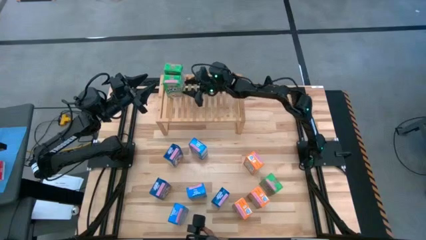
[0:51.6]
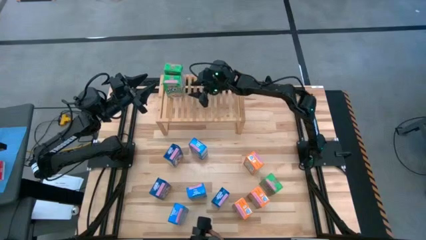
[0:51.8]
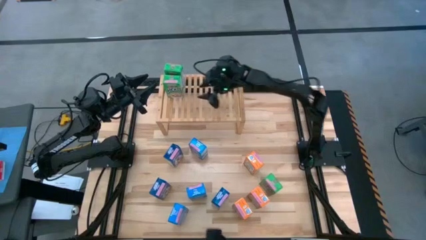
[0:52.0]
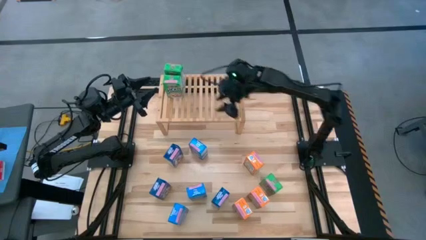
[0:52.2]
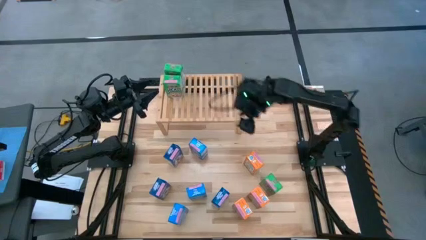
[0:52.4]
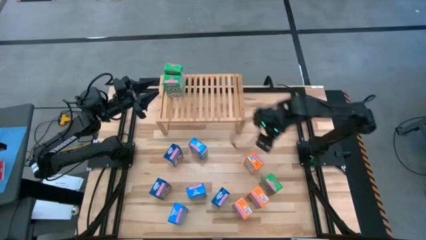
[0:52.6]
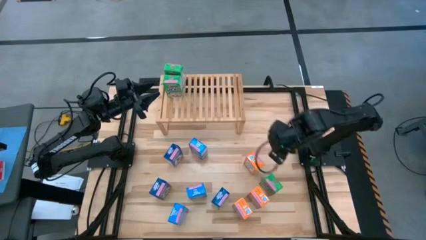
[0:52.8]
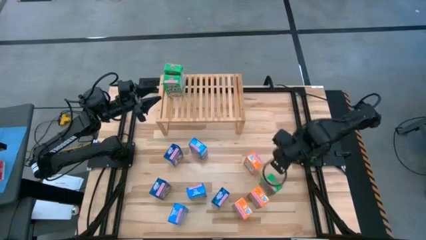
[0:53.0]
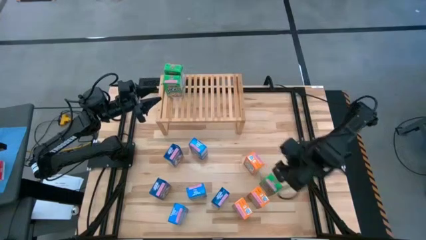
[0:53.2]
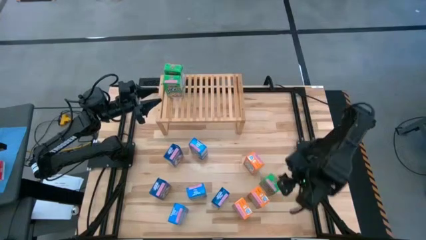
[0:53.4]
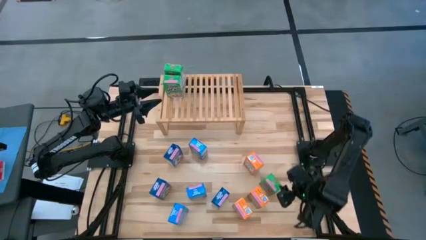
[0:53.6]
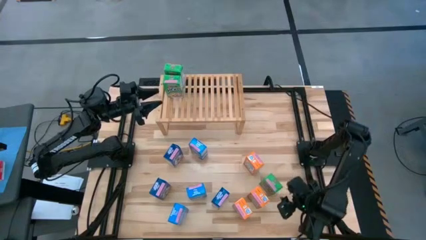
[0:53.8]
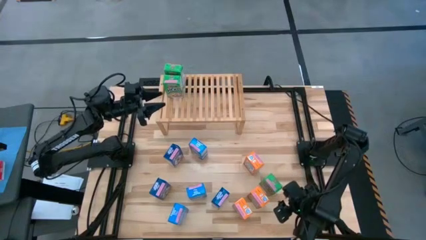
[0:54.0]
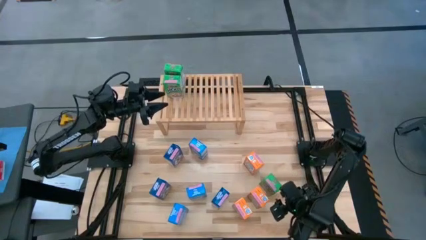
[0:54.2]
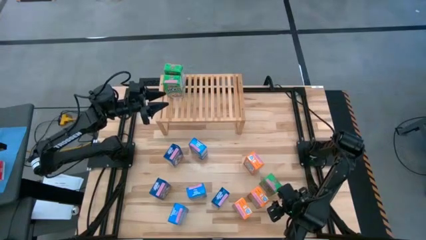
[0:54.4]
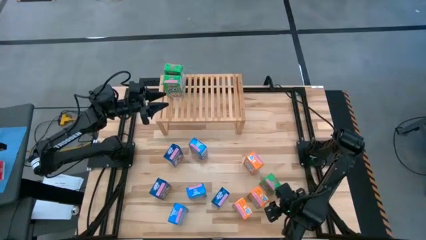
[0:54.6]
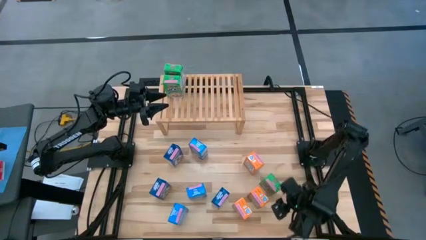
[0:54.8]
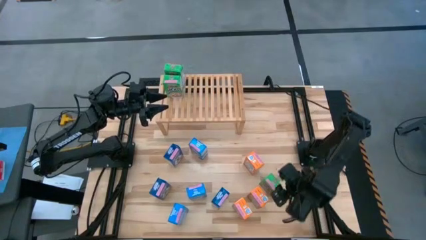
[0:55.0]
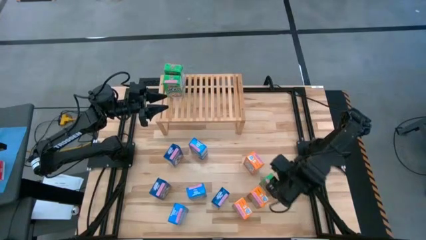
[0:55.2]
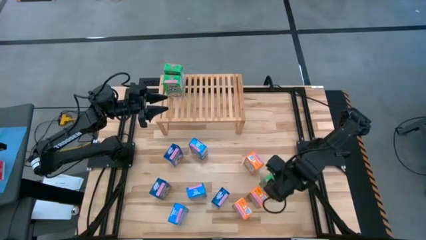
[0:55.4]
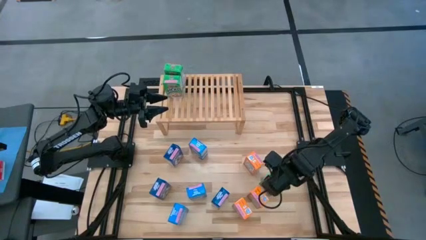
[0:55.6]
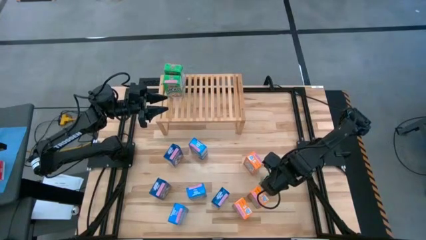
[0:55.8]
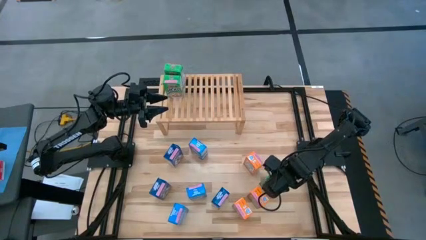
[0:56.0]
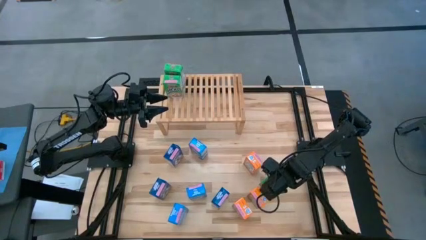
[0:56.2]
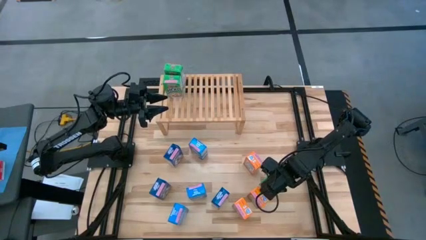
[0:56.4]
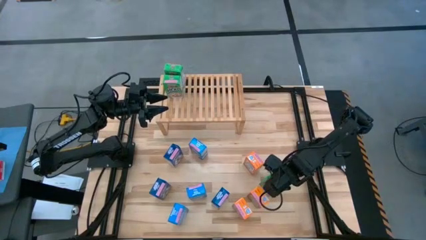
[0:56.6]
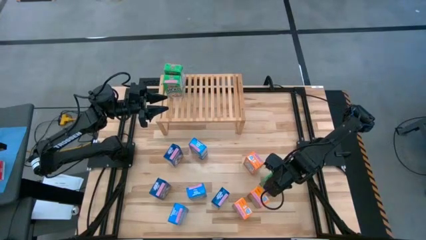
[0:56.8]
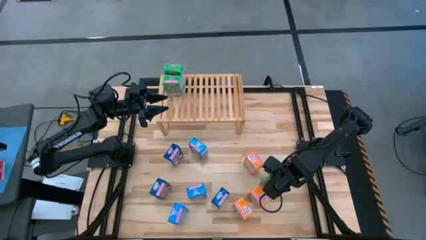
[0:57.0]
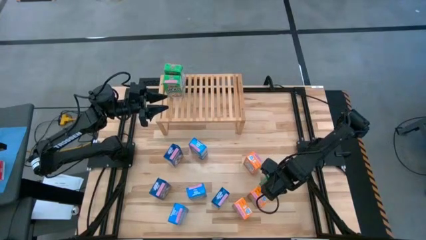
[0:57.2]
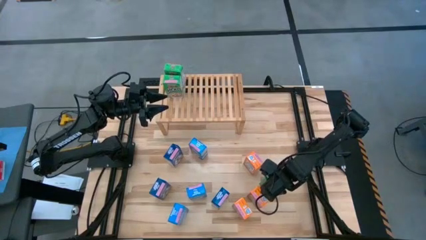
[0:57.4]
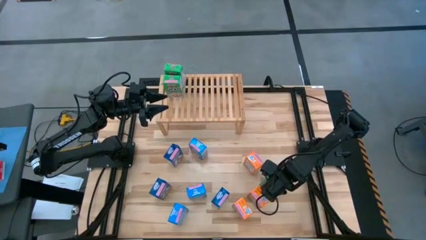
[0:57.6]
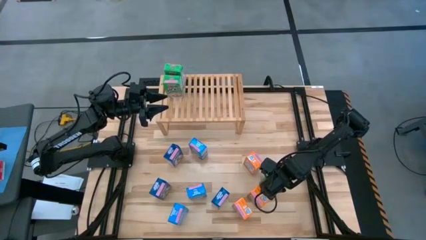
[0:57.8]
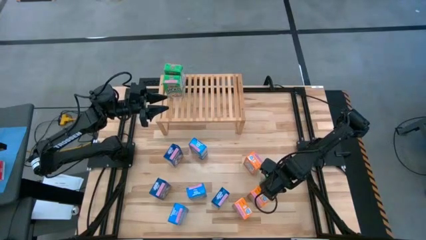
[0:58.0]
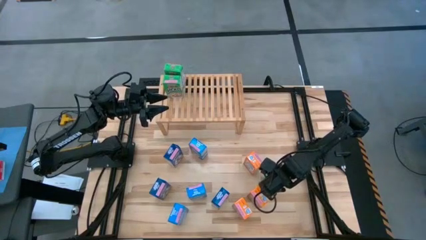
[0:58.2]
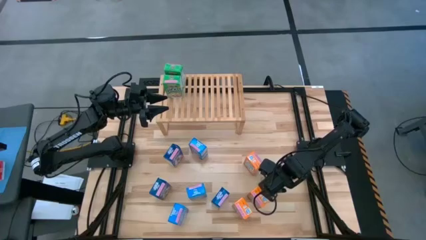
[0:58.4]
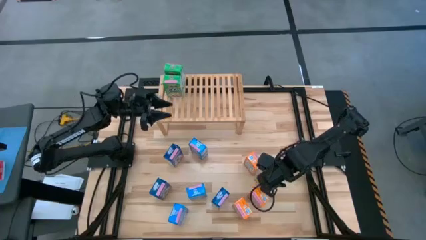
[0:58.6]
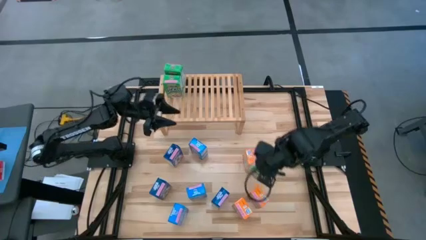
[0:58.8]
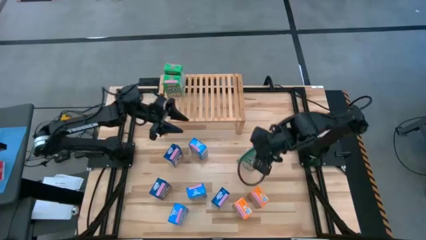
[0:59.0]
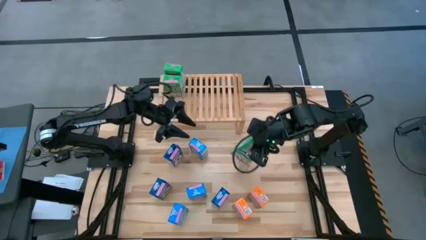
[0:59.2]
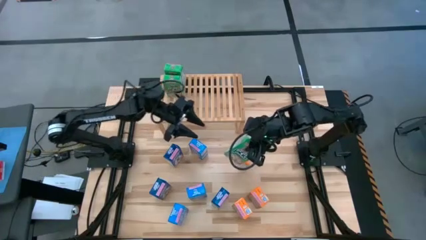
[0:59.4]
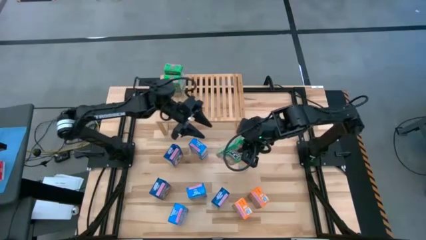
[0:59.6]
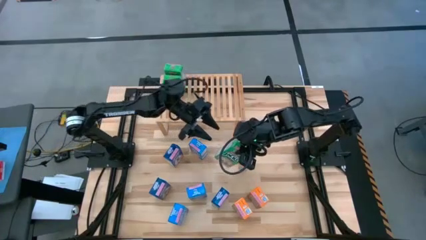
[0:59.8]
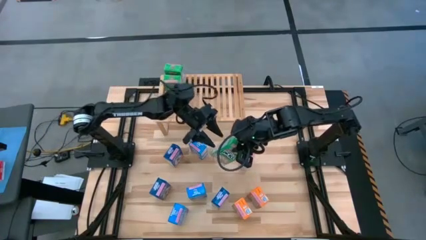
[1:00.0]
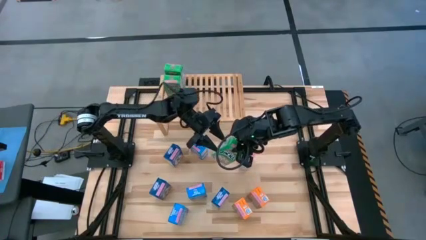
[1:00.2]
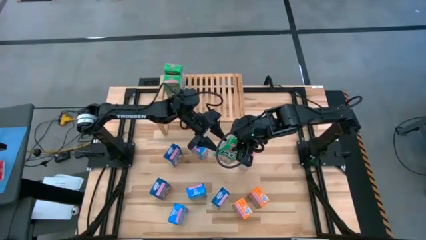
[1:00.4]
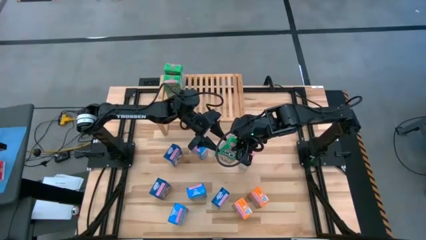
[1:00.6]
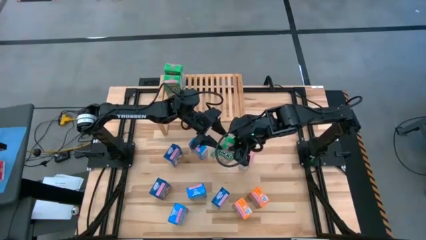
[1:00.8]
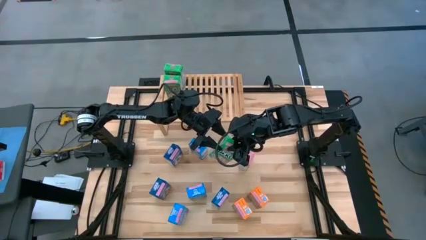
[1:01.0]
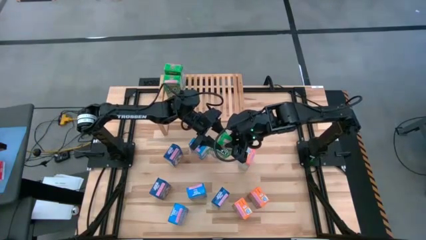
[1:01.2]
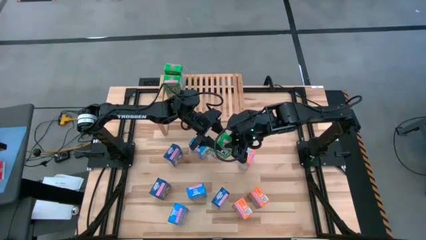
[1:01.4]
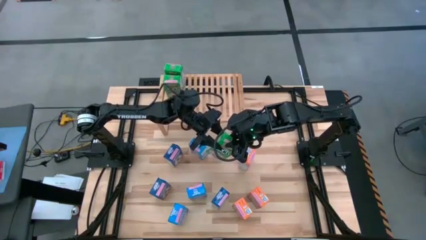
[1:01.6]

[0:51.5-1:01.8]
Task: Stack cereal on shelf
Put the green cereal box on the shelf aligned with other green cereal boxes
